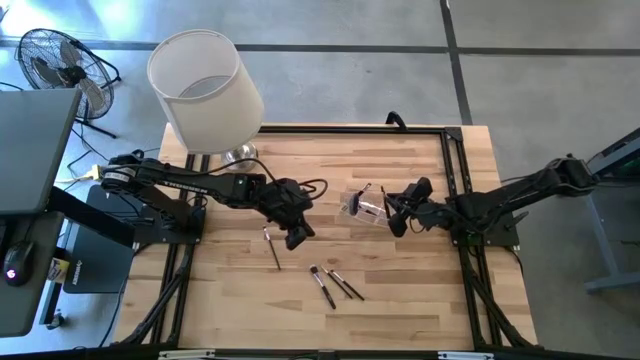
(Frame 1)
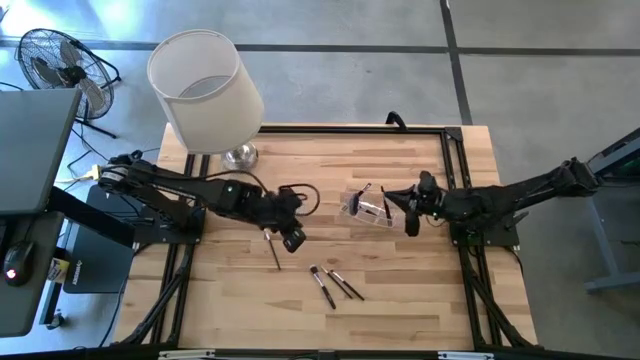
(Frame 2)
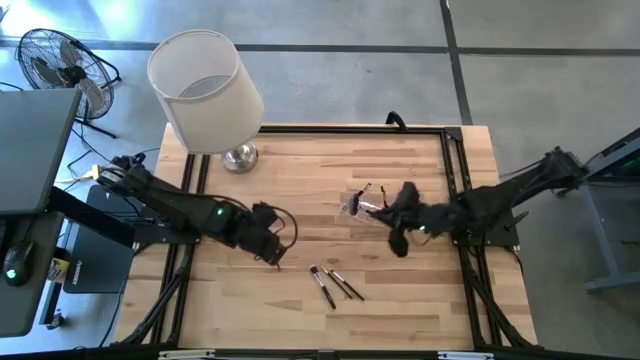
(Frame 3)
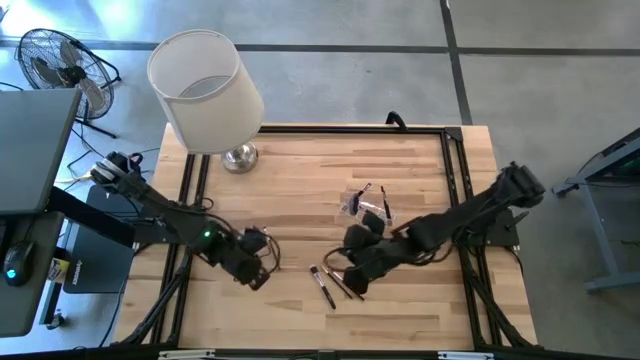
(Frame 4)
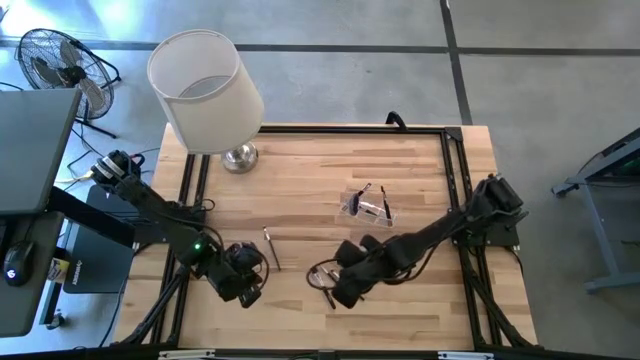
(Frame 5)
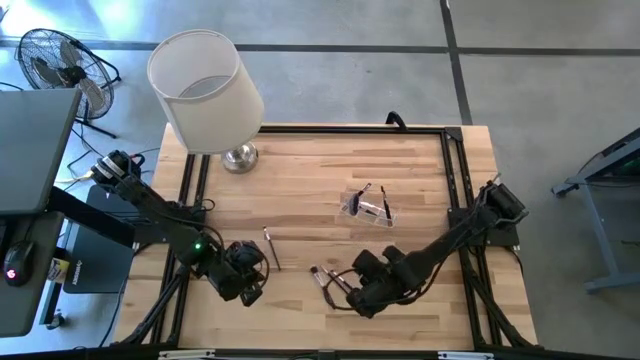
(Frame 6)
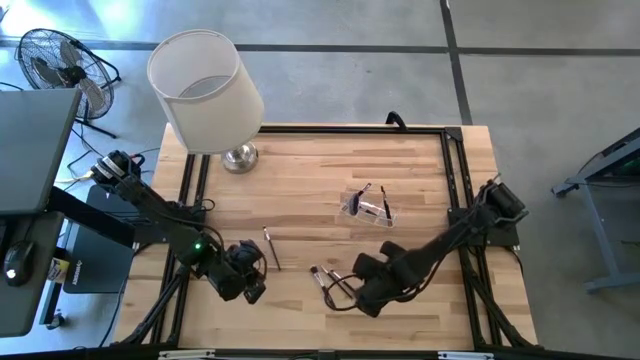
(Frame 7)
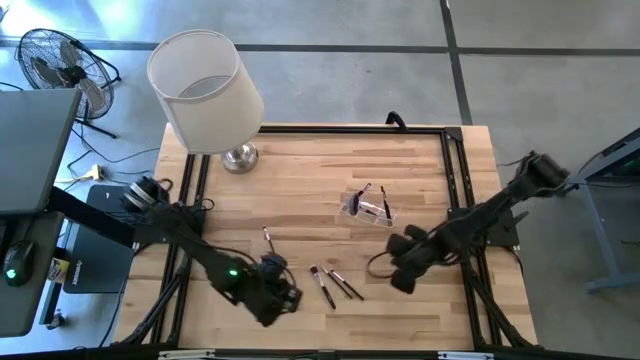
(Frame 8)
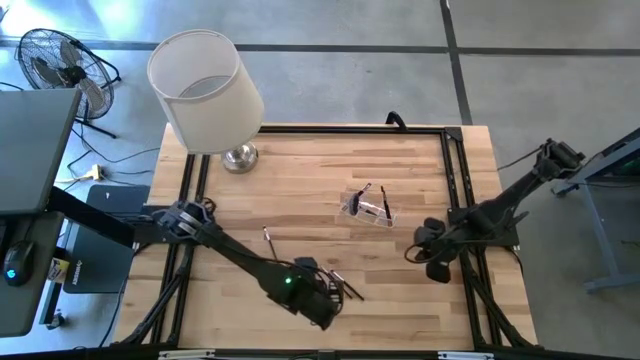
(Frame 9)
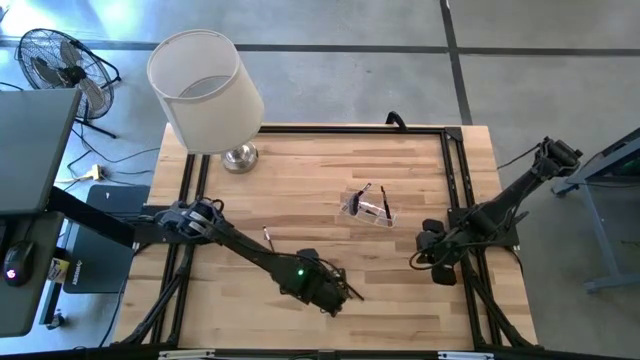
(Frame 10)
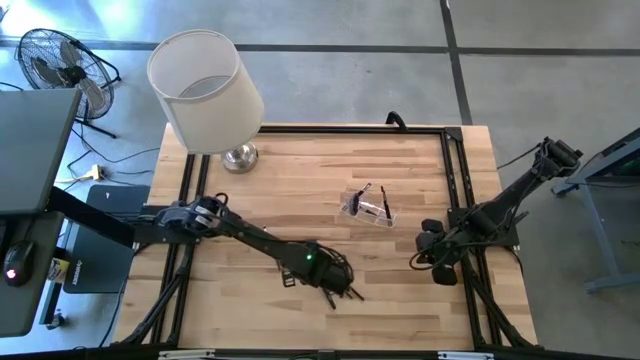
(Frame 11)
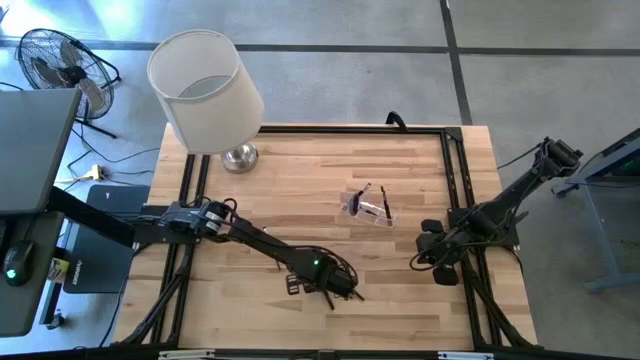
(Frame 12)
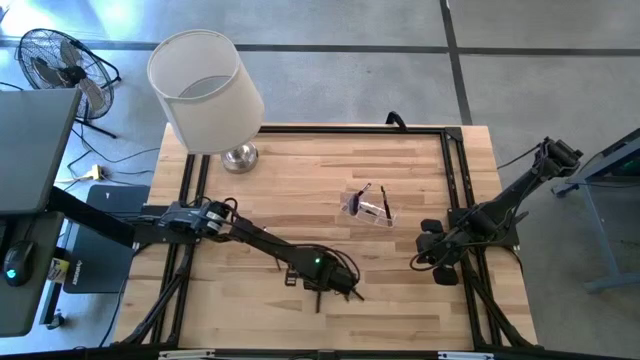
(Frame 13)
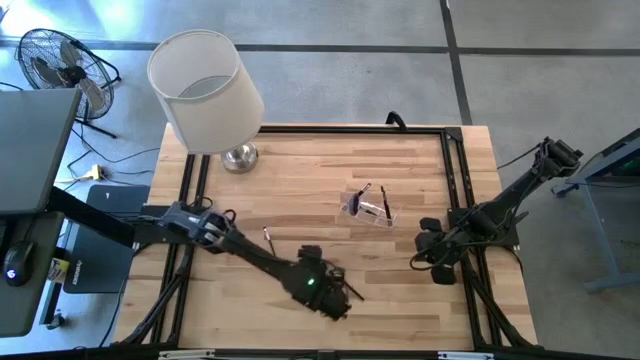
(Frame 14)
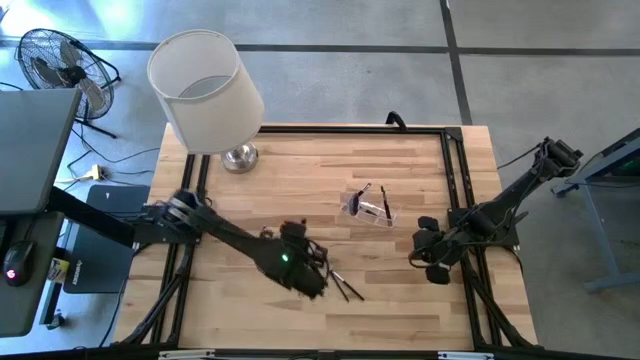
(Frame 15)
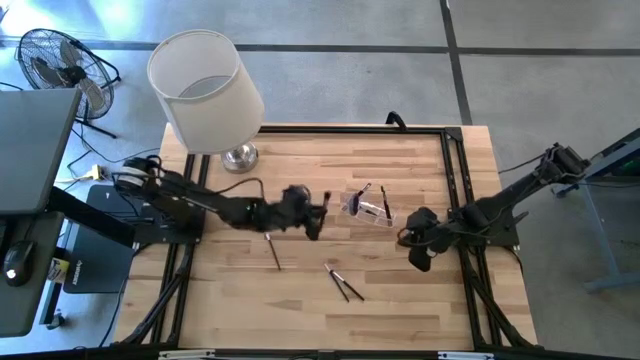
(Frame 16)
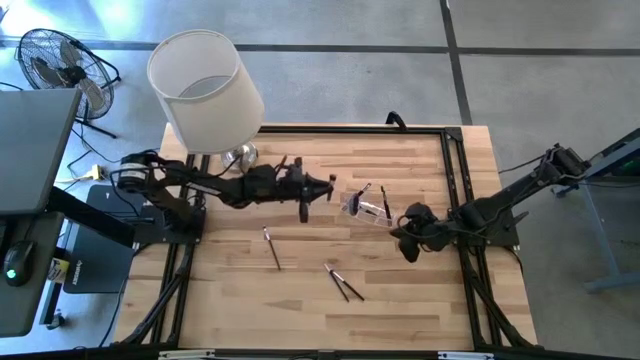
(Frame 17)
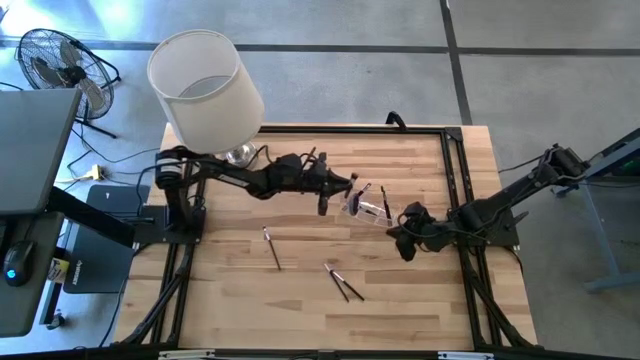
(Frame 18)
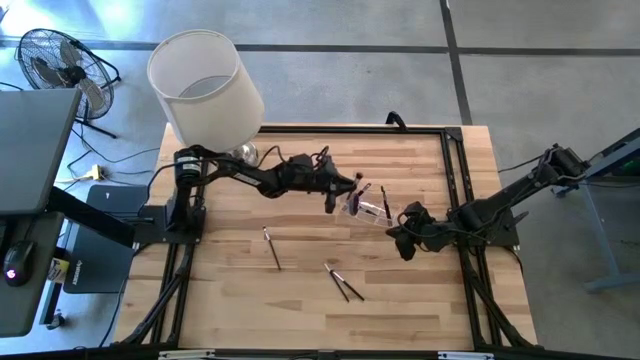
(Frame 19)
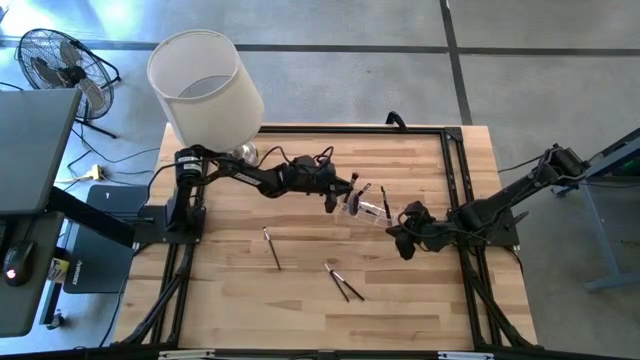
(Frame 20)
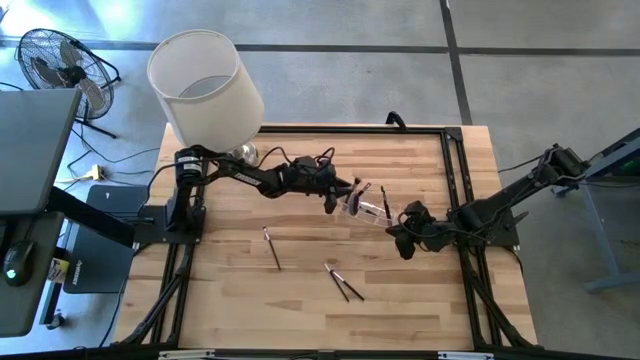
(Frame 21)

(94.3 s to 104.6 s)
Task: Put items in baskets/containers
Put the black foundation brush into the transparent organizer

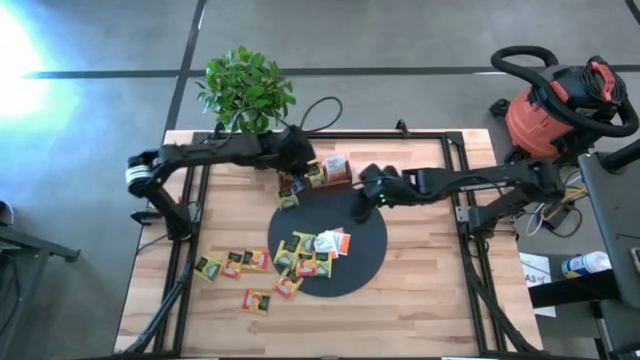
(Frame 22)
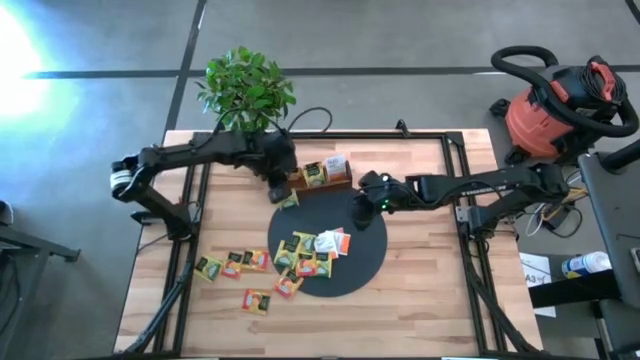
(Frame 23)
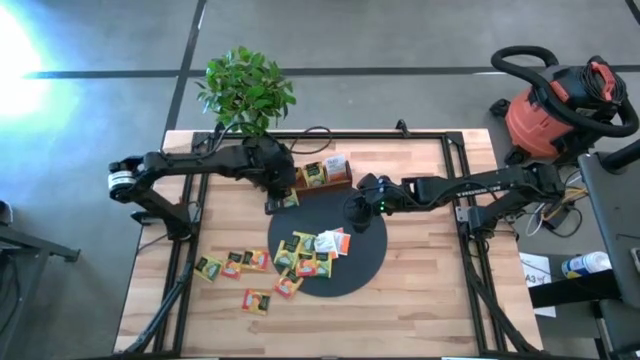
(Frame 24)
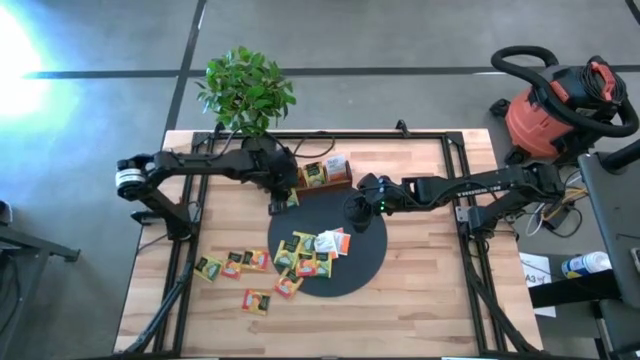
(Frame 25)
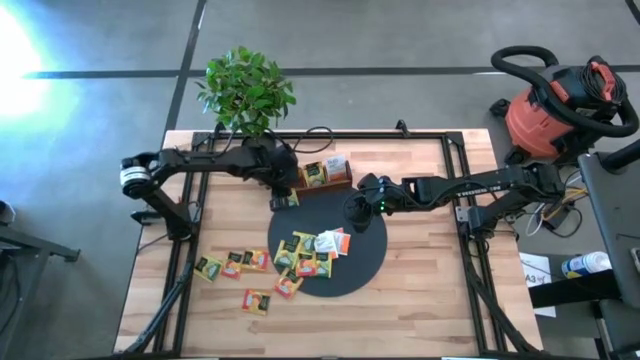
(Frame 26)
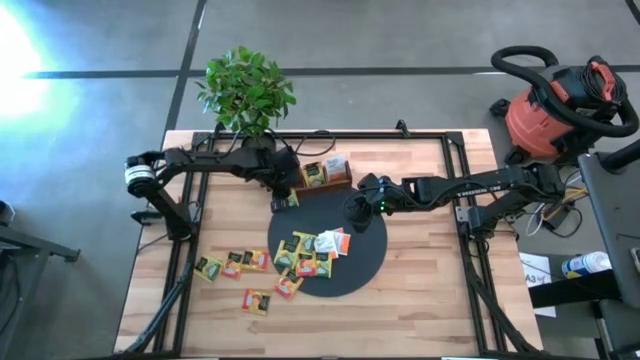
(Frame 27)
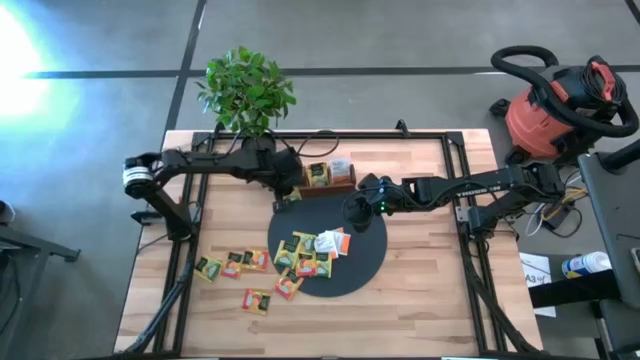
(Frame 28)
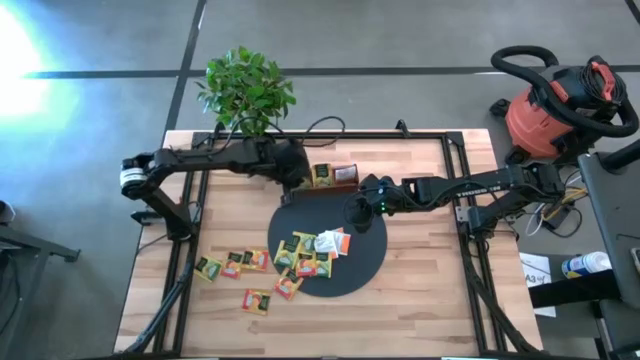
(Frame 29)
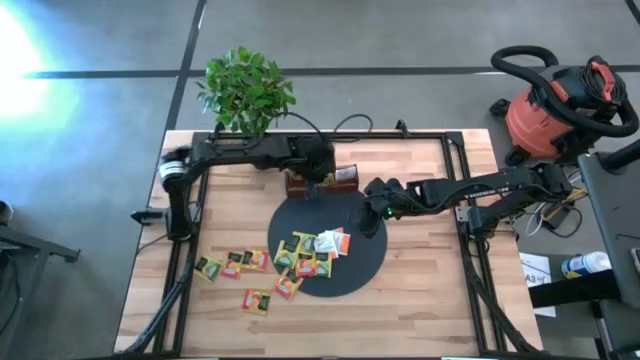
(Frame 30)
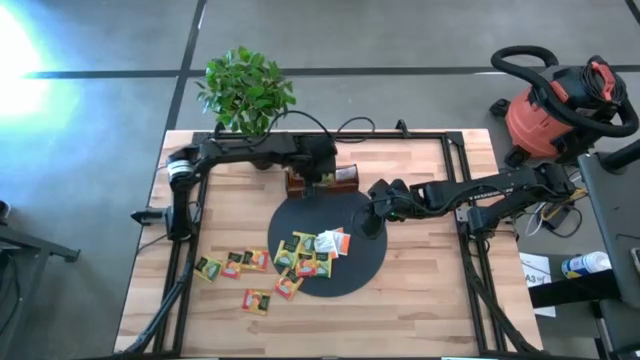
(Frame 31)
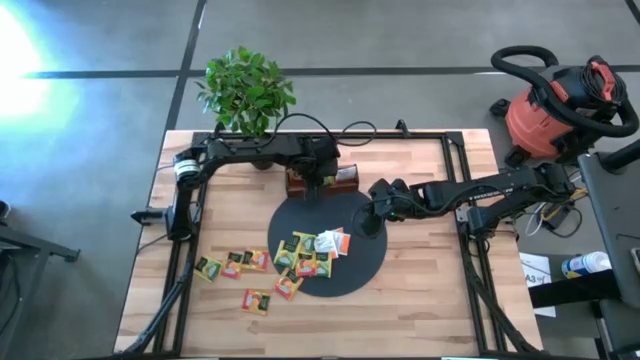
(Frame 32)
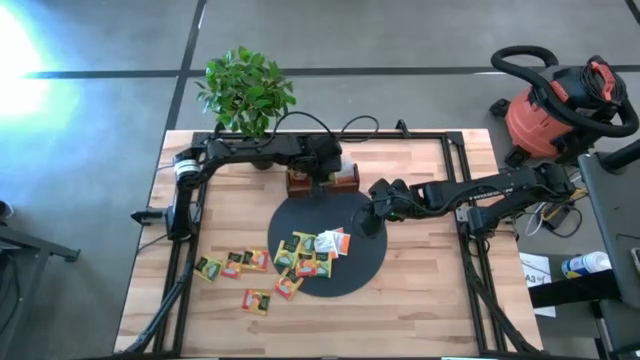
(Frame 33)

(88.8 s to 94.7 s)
Task: Pick & Place Tea
Put the yellow tea bag into the middle slot of the wooden organizer

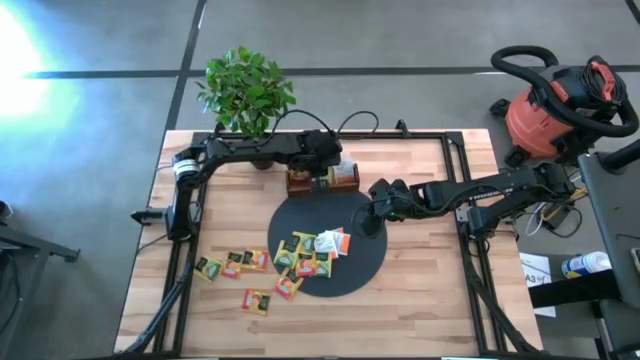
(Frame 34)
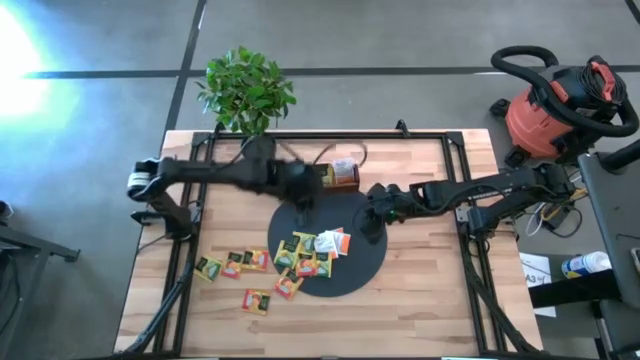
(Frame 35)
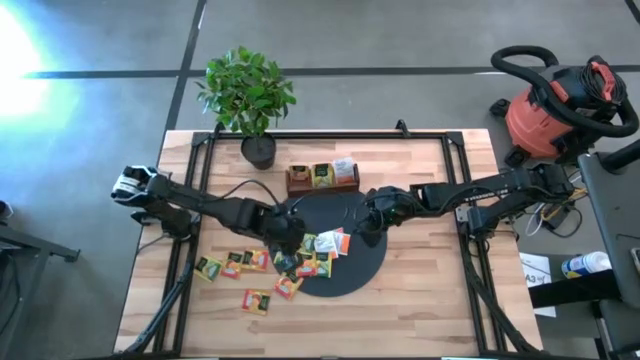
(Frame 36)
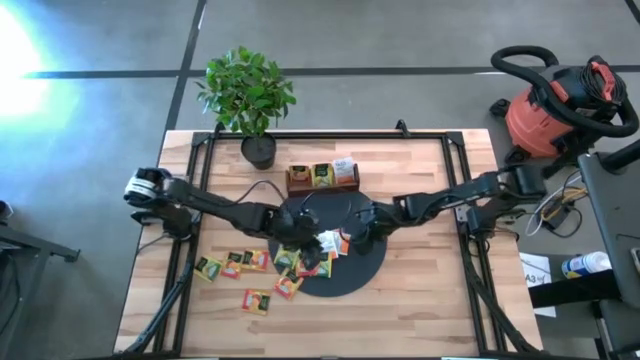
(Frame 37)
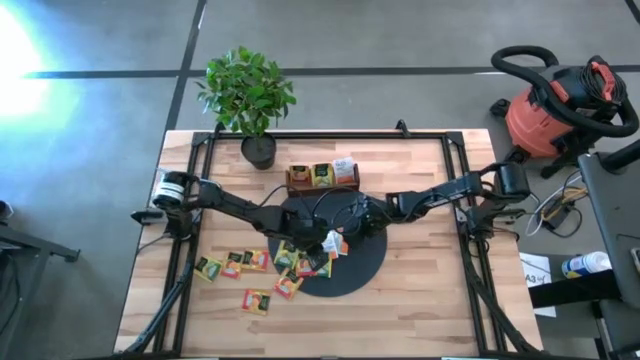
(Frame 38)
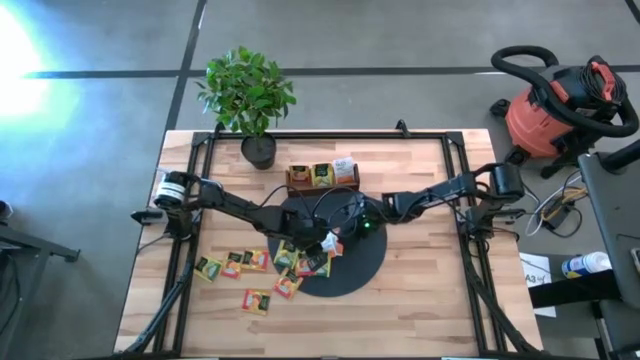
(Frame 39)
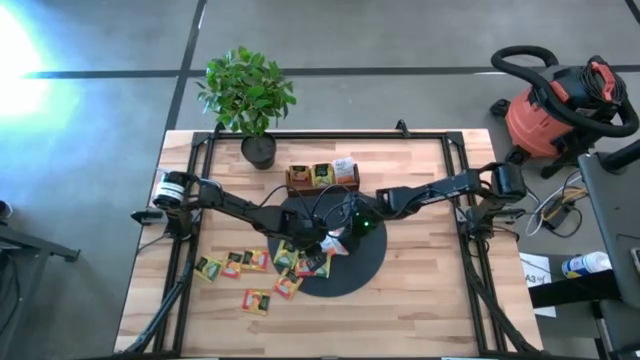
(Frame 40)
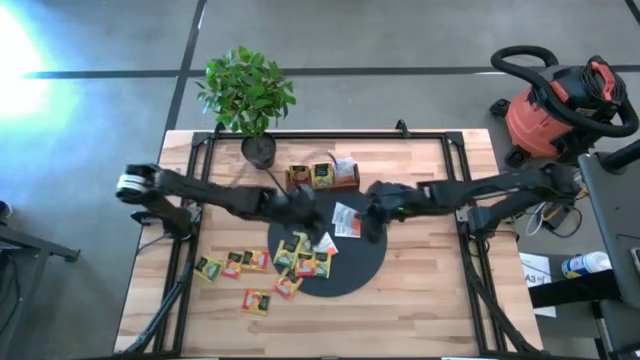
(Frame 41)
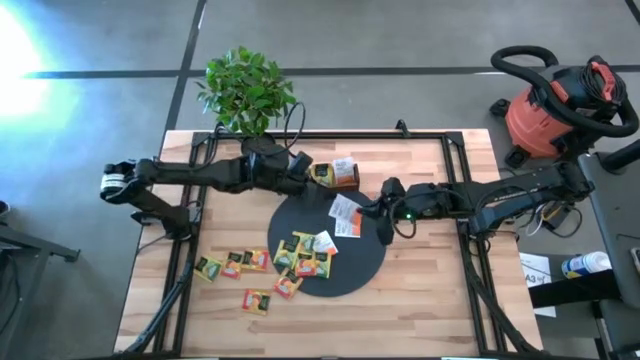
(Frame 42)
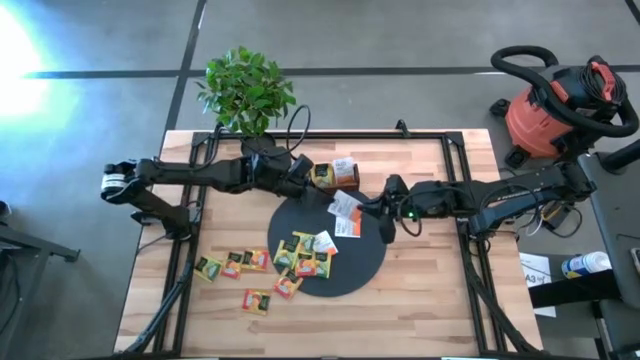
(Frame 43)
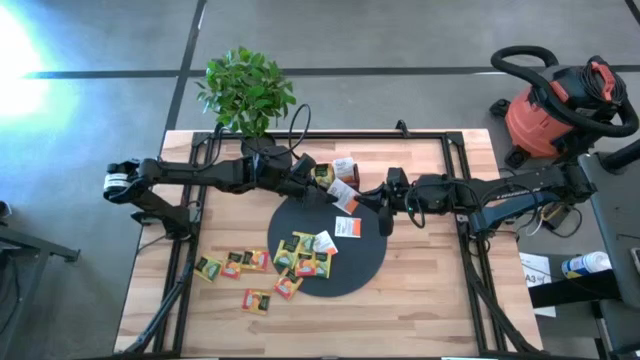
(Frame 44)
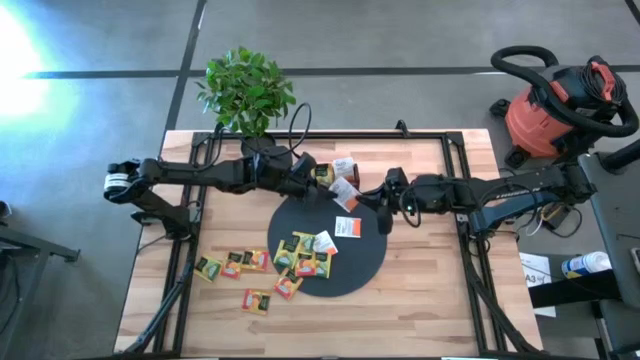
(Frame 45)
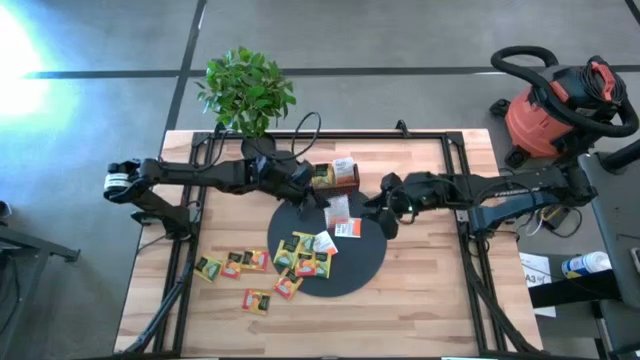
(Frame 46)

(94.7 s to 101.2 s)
Put the middle white tea bag into the right slot of the wooden organizer
